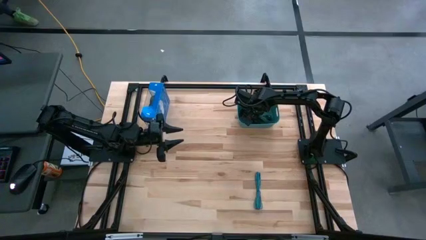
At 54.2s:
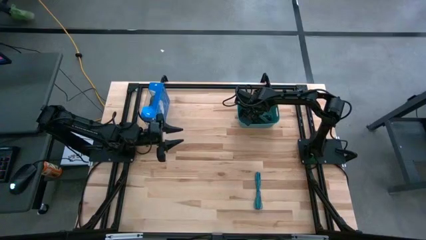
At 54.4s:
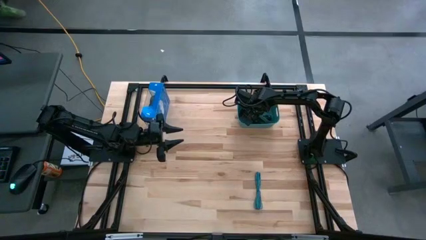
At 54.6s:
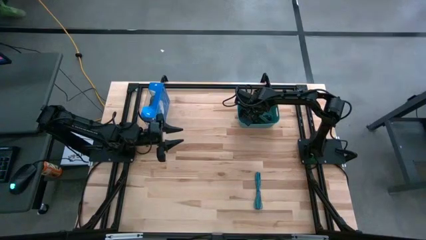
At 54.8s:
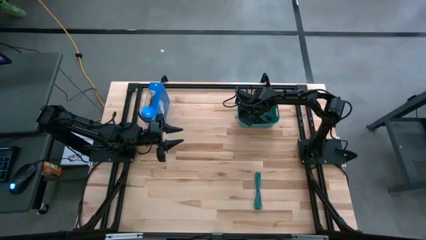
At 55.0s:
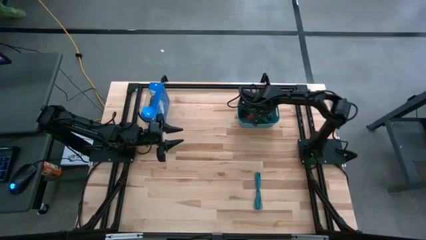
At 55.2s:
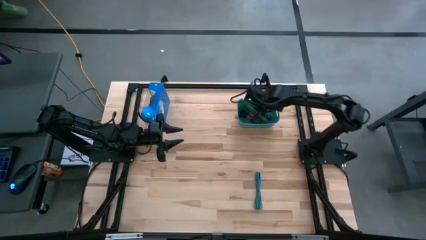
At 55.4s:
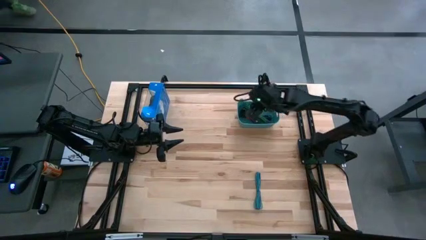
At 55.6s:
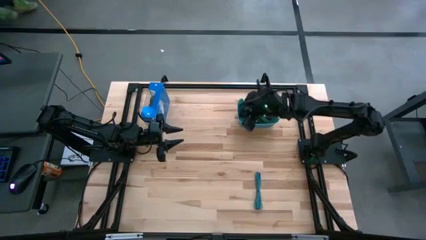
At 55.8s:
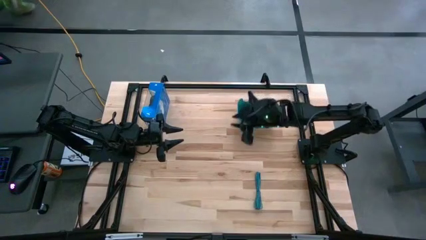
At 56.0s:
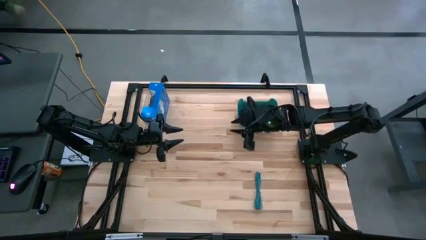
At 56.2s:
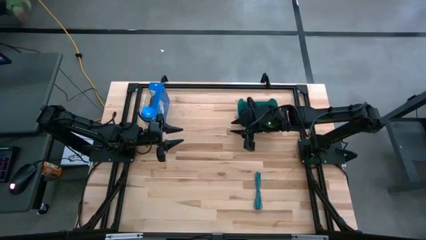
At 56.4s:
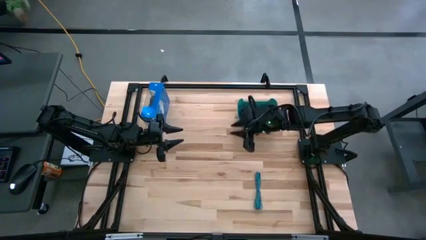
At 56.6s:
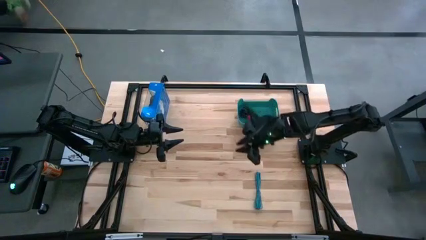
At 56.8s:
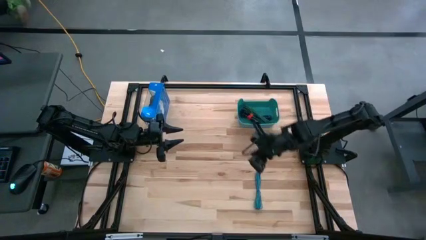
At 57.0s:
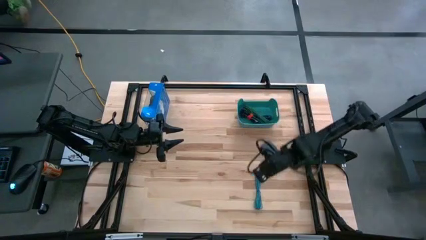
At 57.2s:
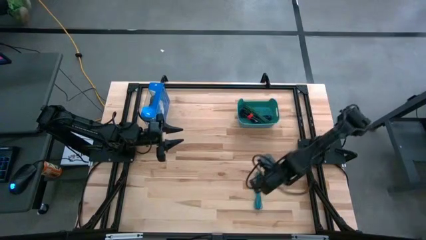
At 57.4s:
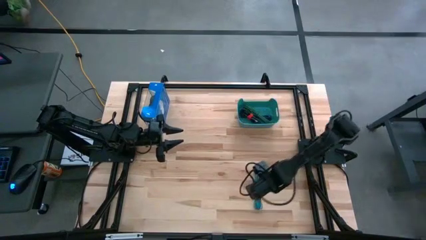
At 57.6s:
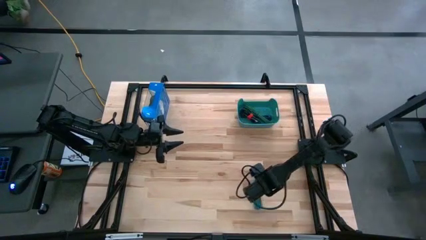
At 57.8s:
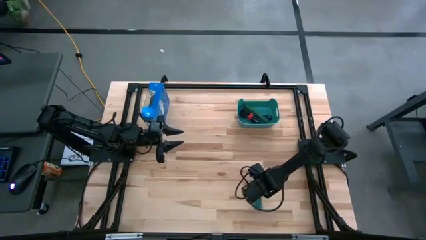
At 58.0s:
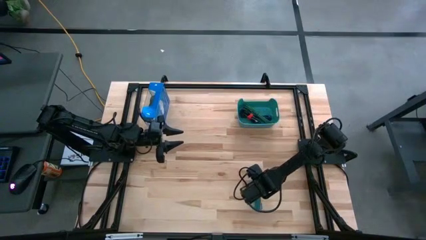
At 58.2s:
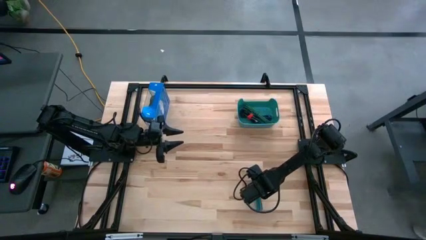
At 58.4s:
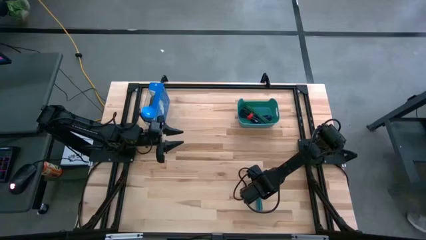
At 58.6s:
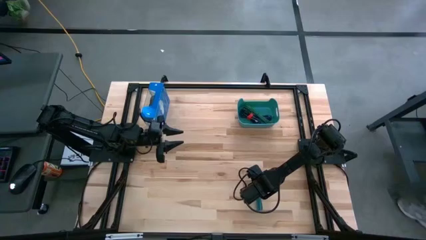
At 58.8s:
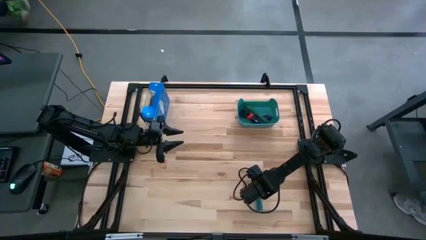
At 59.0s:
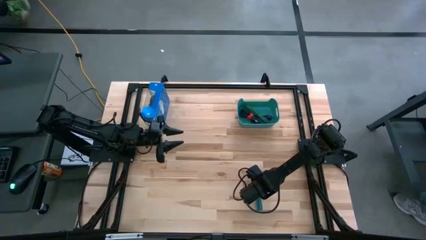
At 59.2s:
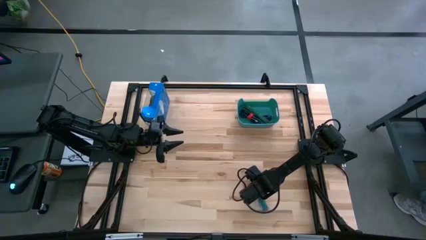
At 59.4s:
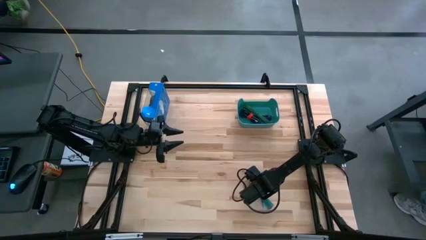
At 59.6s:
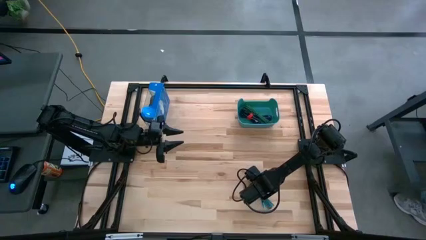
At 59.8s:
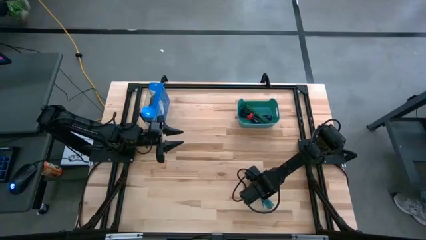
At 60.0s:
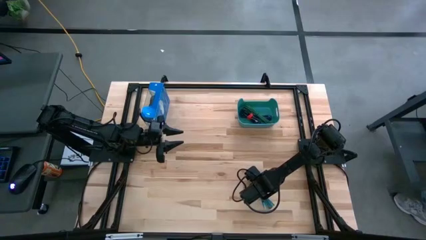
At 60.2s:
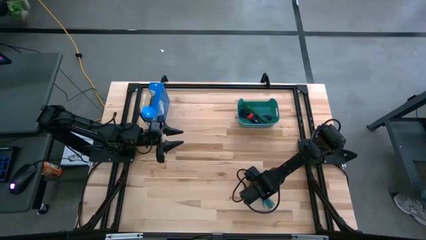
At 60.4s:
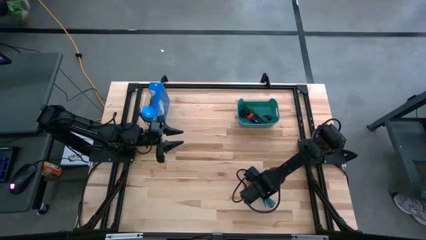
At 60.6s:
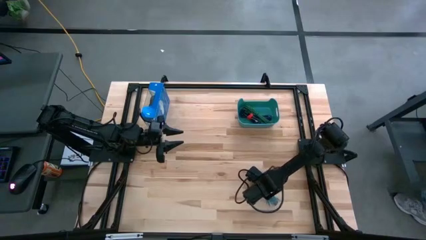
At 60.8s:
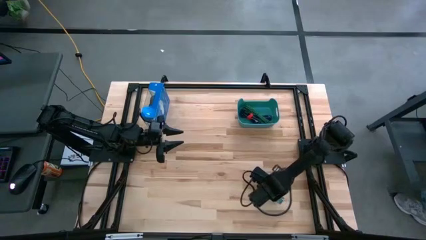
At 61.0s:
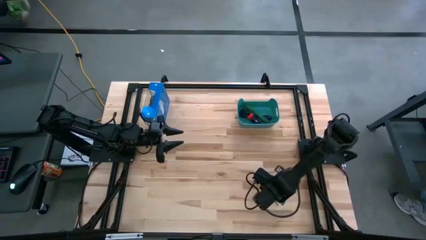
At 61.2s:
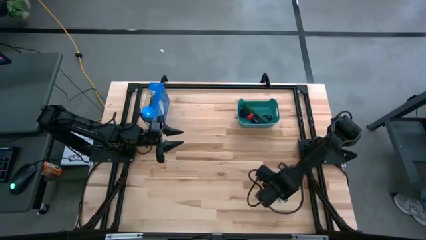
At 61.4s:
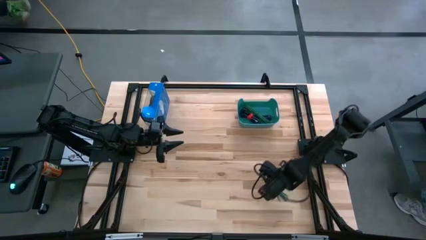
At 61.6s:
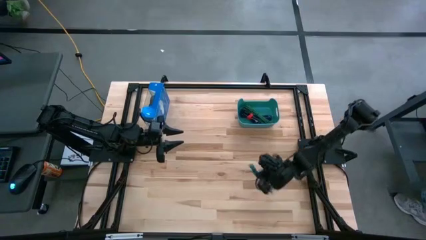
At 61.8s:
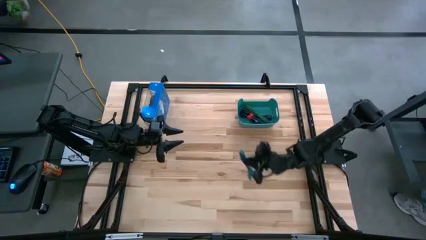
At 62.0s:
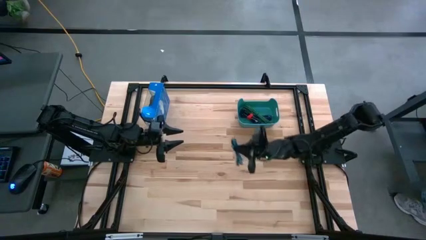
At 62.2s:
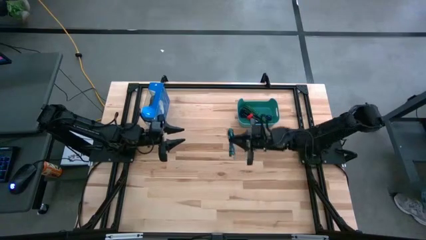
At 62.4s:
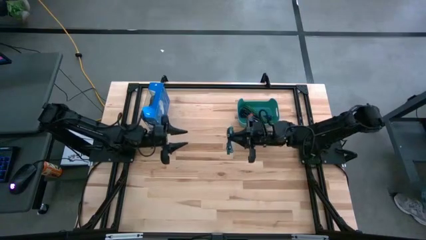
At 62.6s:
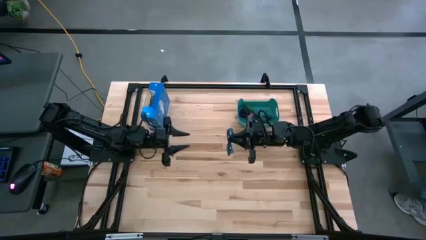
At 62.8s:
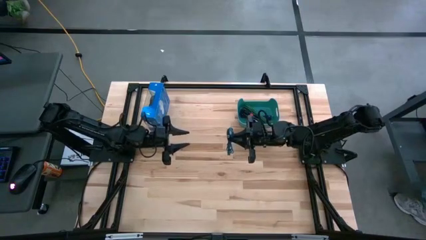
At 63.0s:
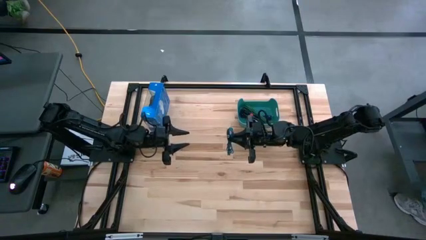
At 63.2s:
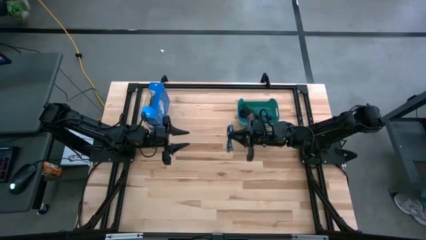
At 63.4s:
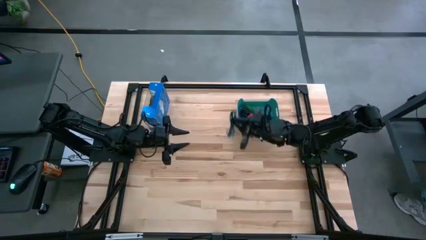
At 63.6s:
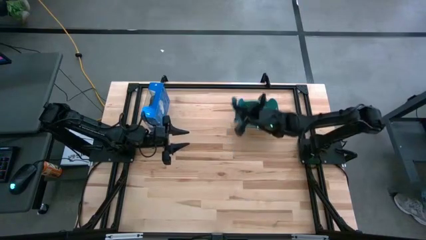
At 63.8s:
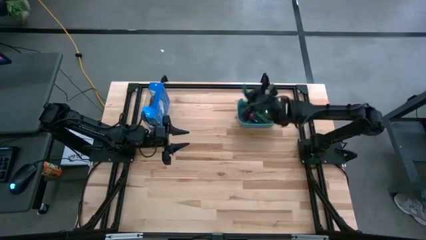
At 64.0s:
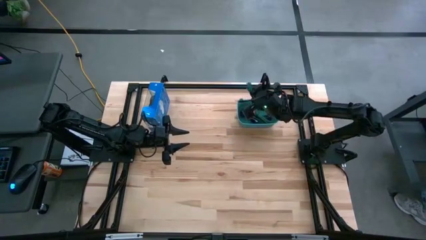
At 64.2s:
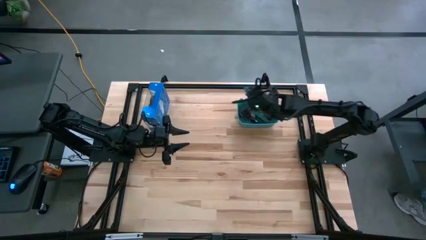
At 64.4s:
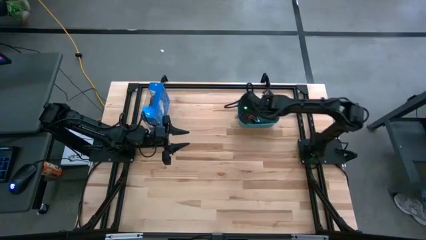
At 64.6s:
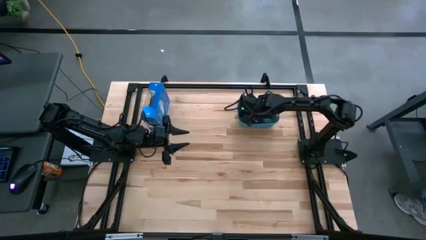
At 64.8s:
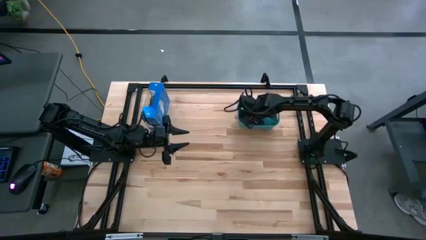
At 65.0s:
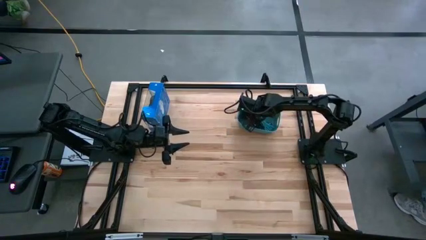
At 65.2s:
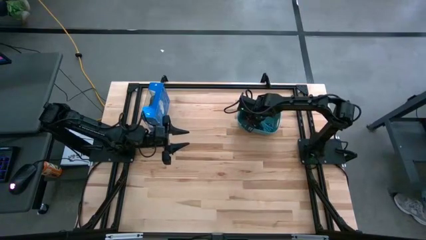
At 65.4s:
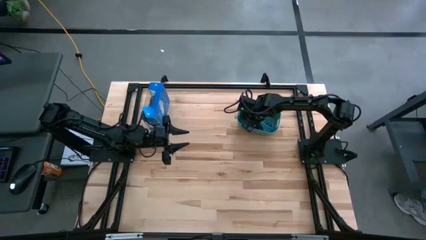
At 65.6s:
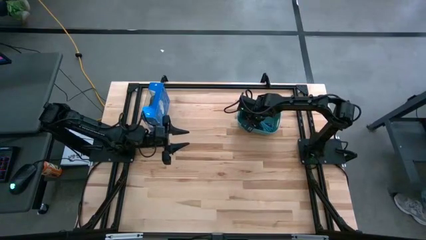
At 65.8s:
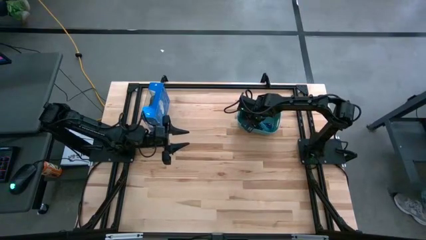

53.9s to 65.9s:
Task: Pick and place USB-C Cables
Put the blue charger cable into the green bin

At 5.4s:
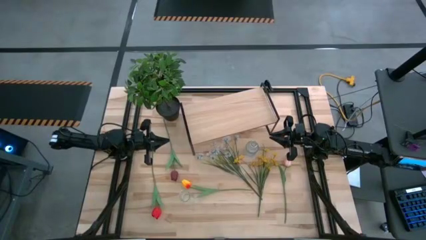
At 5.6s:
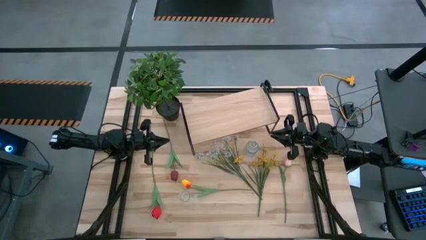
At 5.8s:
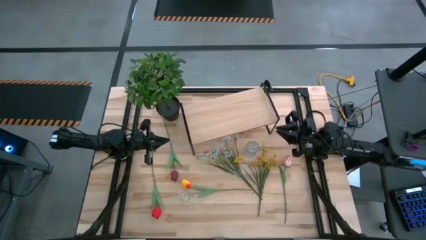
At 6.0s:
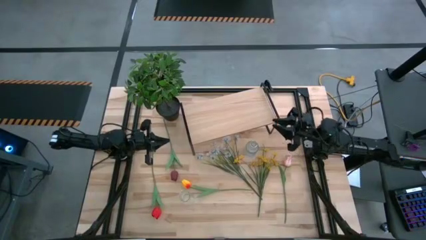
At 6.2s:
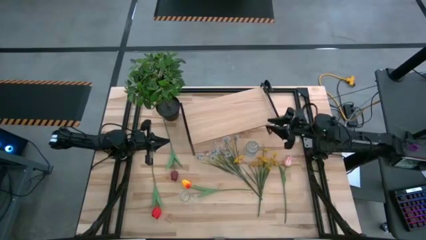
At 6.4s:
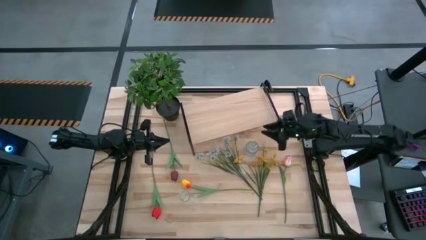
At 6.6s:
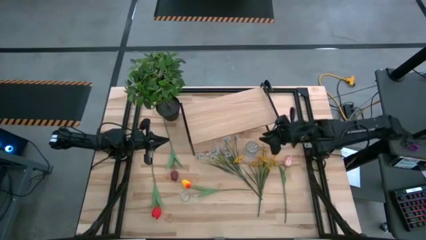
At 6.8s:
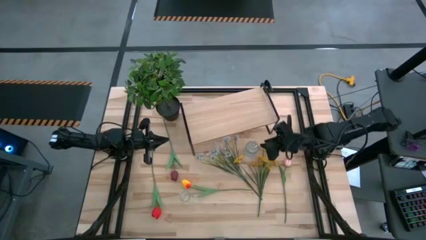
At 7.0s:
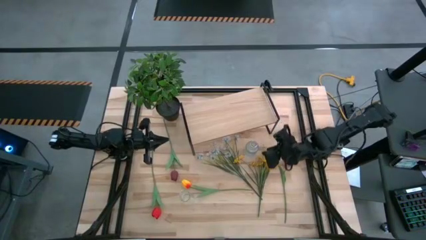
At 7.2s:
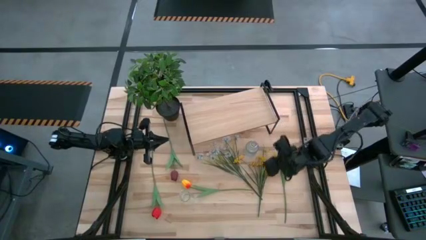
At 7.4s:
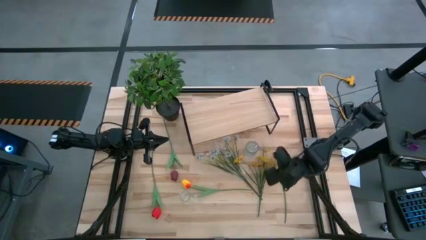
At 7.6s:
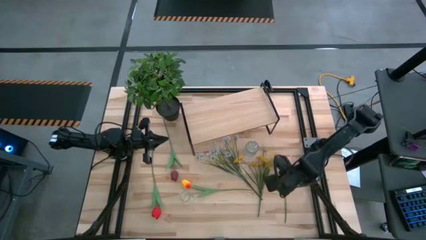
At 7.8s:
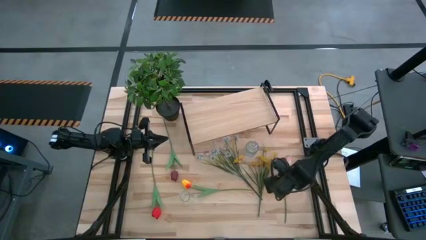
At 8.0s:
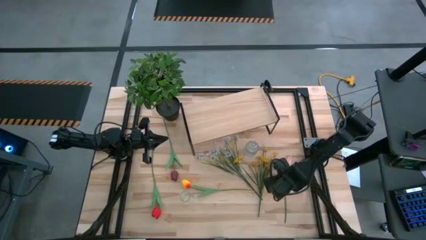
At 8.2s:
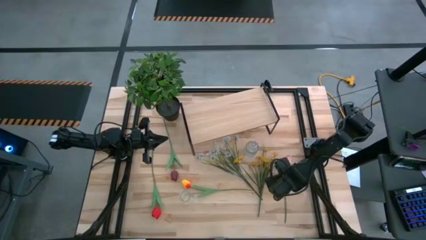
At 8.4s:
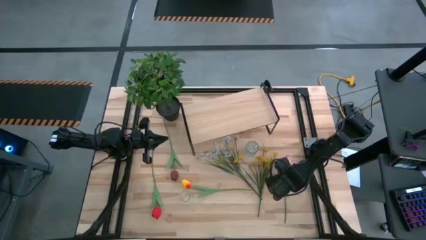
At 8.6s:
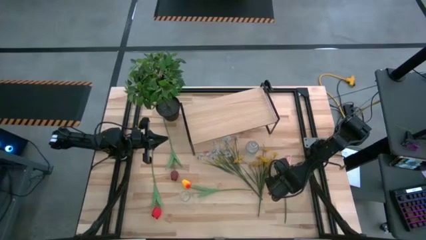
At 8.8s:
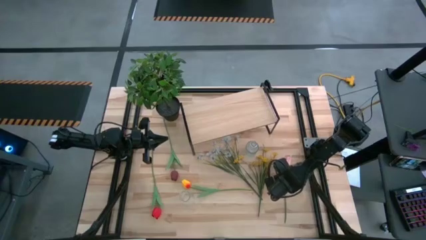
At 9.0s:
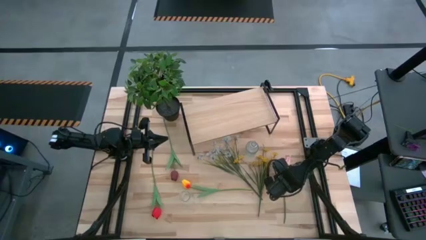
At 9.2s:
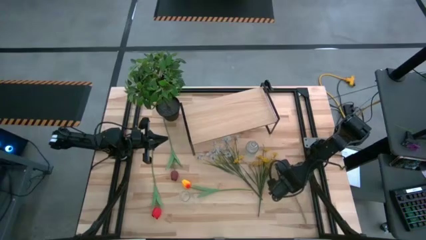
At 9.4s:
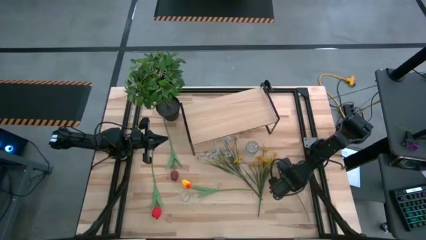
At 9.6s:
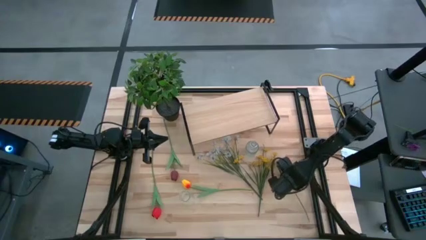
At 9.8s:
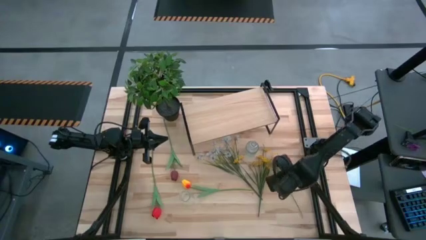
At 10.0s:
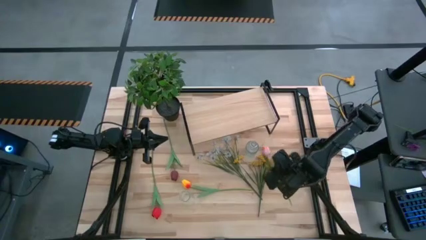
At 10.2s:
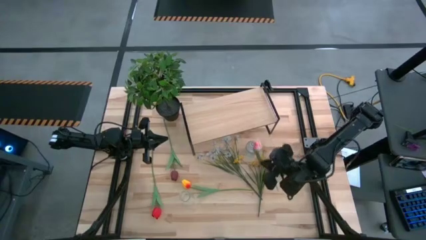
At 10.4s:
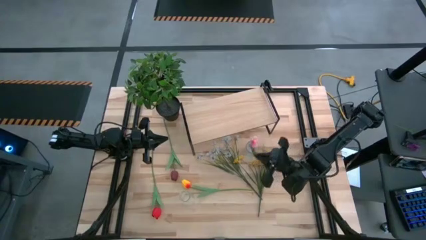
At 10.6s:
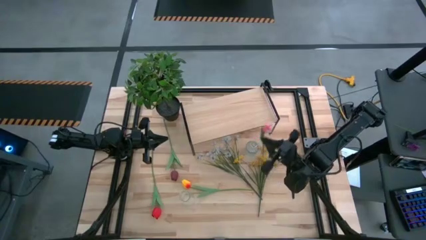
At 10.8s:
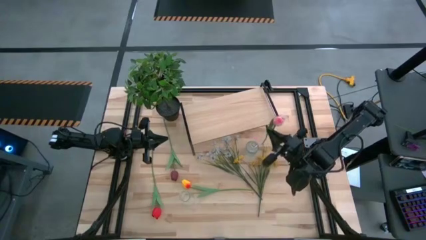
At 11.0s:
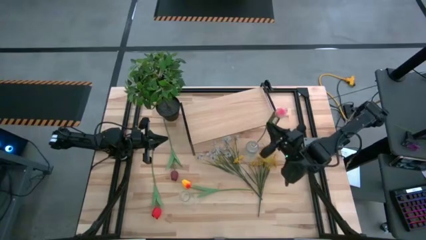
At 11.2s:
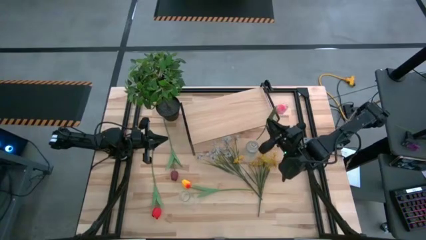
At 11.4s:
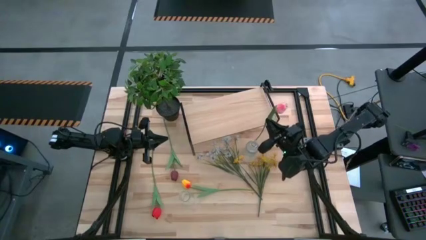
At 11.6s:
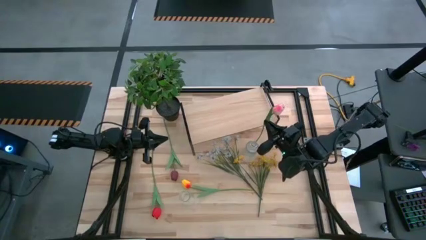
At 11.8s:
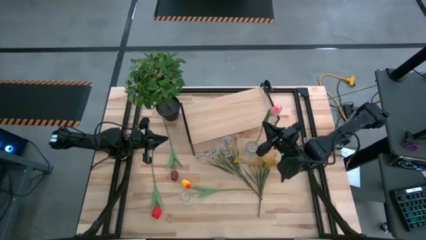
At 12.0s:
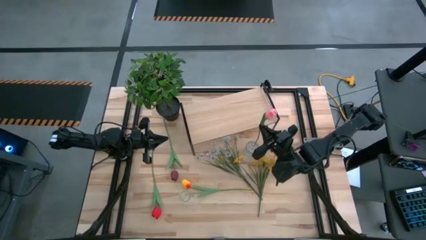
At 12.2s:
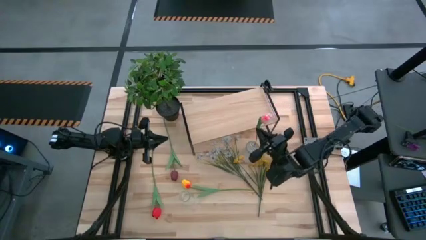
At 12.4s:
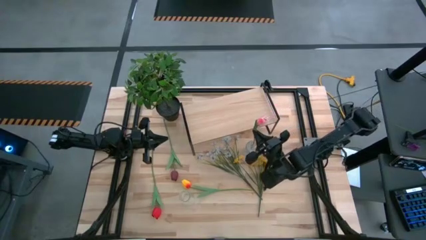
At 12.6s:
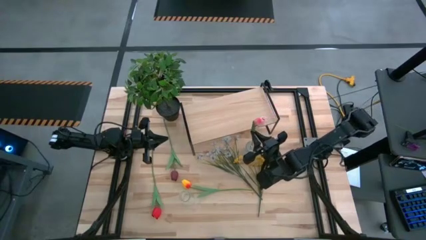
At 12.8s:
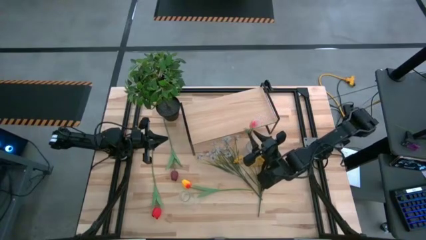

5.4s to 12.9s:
Task: Pick and place flowers into a vace then onto a shelf
Put the pink flower into the top transparent vase
